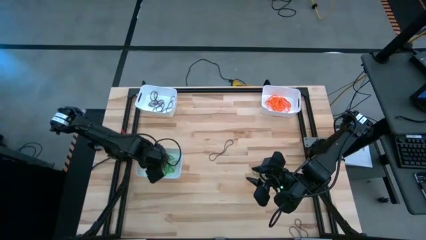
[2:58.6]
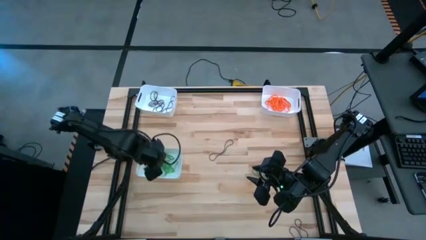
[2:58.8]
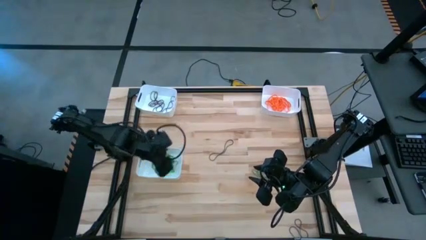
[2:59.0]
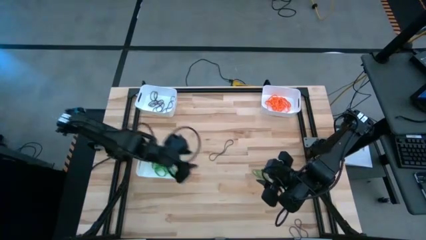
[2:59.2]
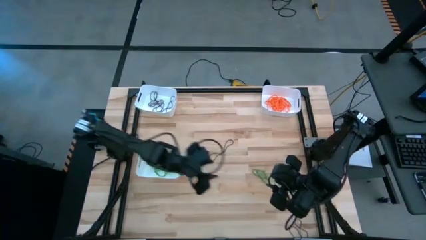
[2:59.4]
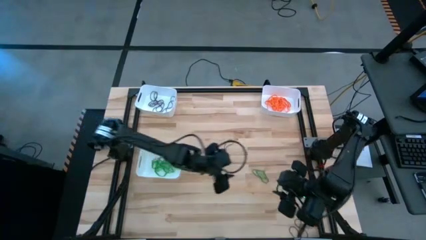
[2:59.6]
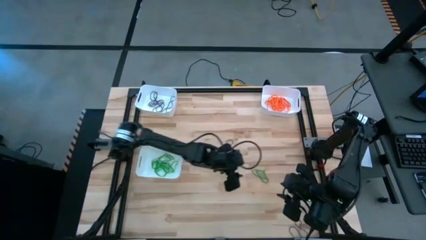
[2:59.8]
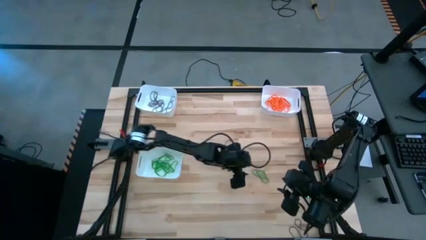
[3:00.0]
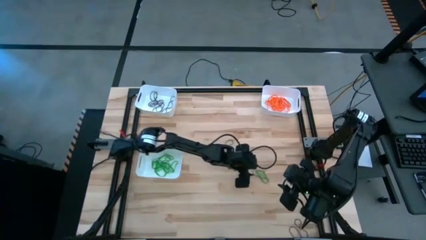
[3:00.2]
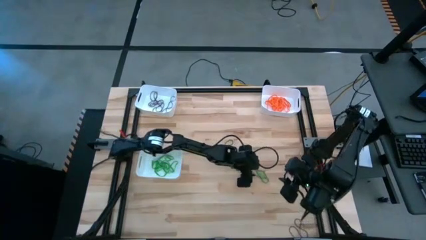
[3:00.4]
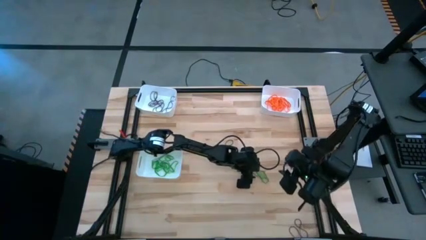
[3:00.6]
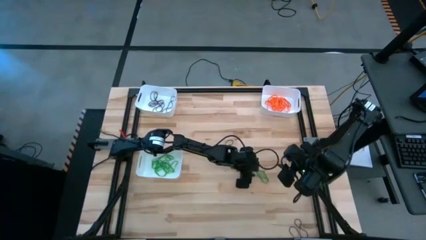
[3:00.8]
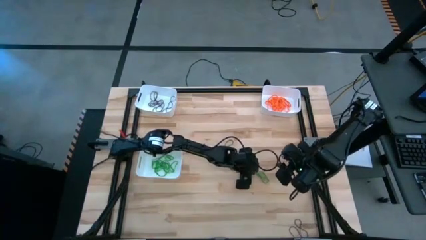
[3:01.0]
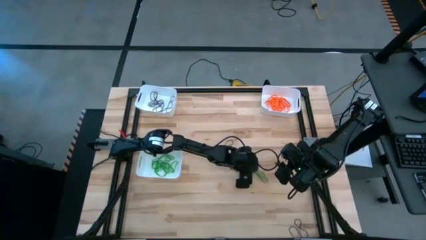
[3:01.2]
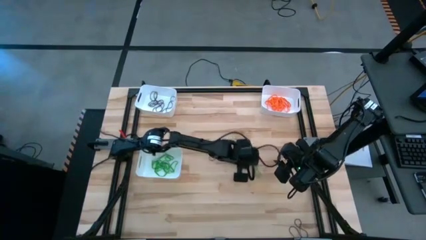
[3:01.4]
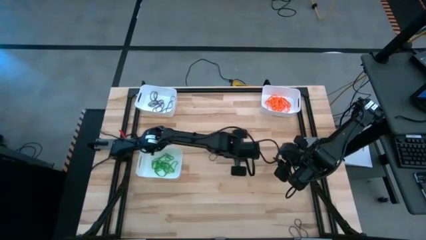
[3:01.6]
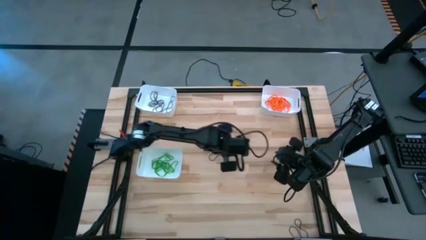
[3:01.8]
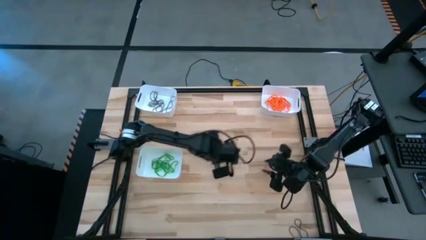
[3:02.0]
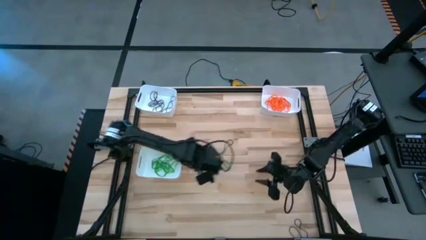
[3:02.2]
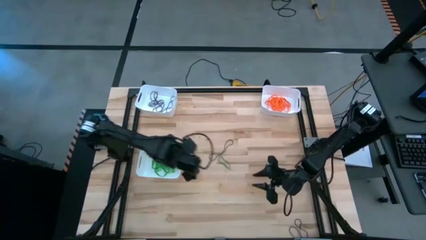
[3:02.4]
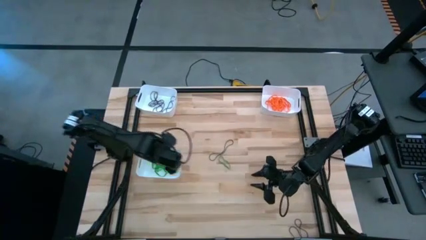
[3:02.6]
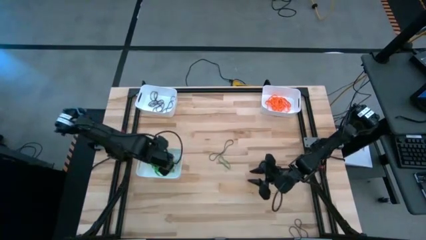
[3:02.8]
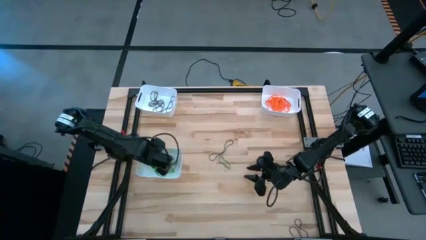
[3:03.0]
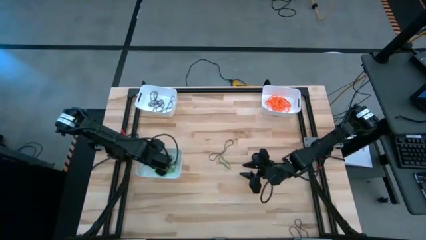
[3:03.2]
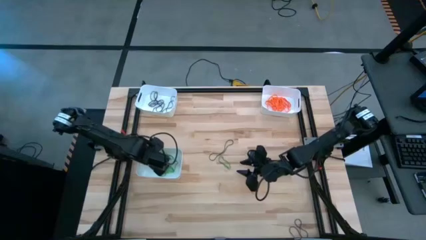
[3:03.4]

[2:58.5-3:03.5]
Task: Sort rubber bands into baskets
Put the green rubber band into the bottom white bin

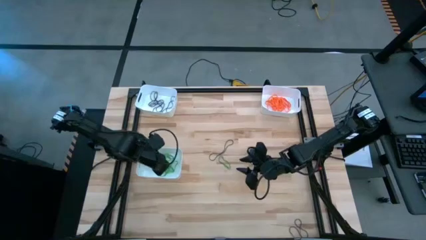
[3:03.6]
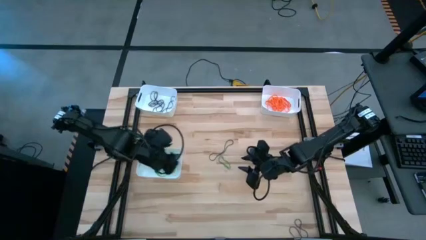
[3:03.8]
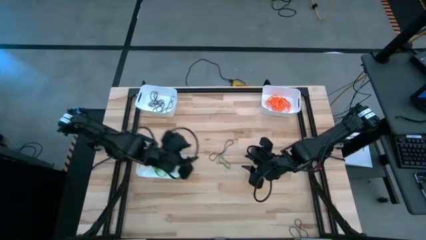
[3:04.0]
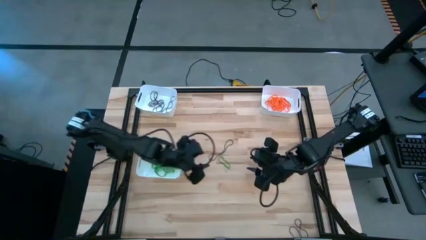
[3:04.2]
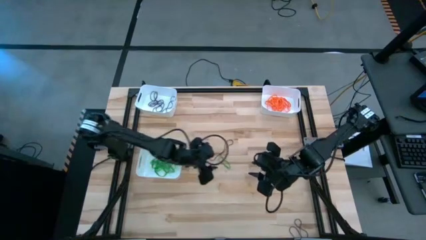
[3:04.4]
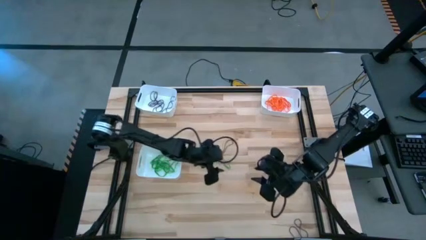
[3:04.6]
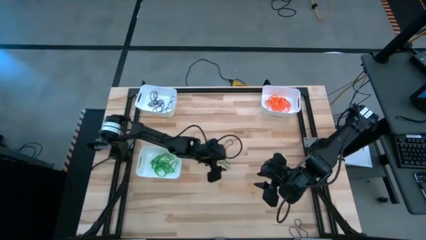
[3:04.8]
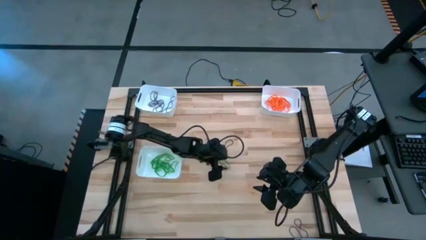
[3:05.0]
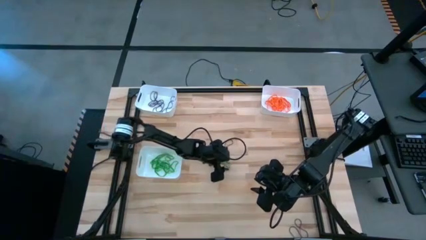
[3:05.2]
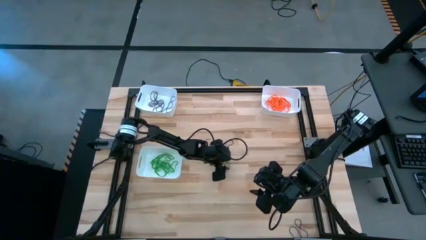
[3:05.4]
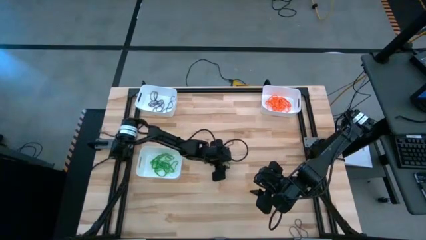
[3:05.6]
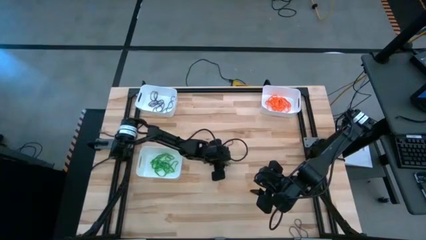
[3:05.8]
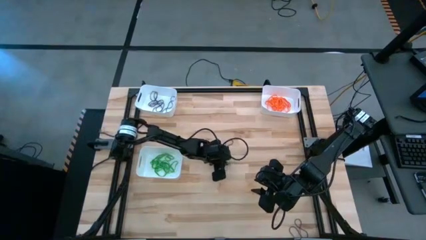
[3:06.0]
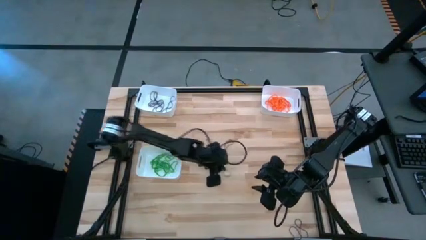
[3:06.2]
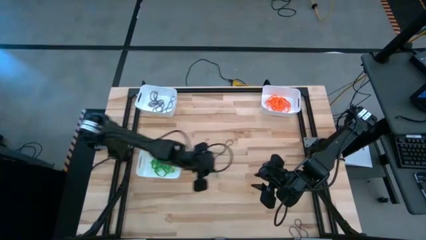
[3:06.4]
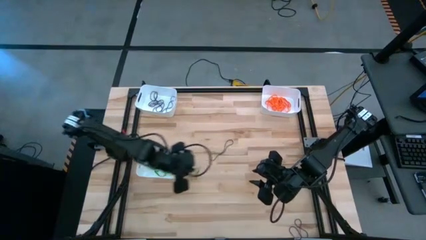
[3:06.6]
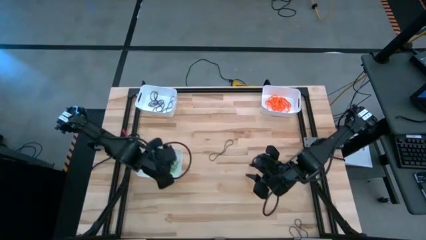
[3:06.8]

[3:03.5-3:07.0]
Put the green rubber band into the bottom white bin

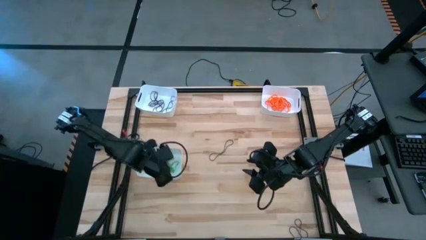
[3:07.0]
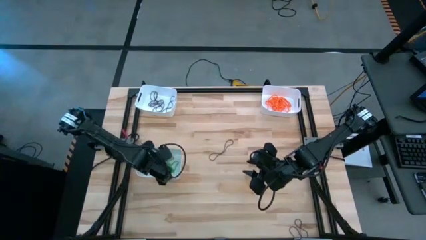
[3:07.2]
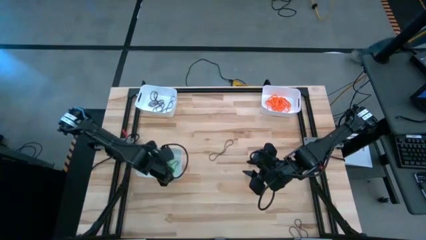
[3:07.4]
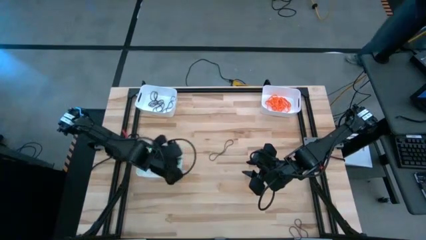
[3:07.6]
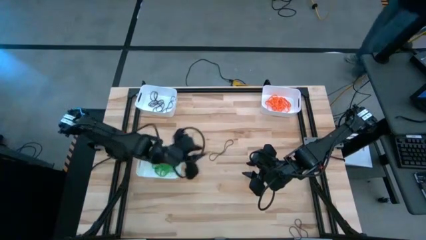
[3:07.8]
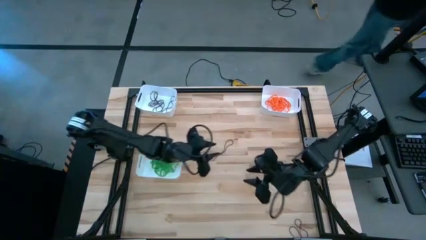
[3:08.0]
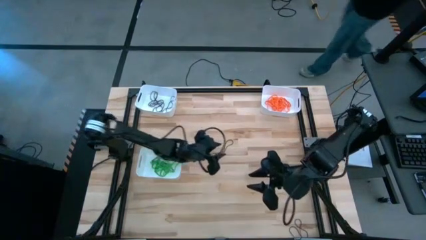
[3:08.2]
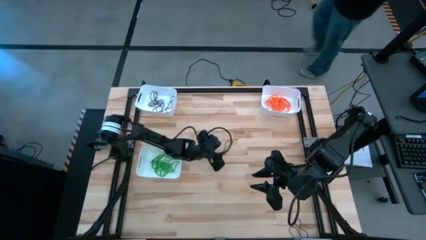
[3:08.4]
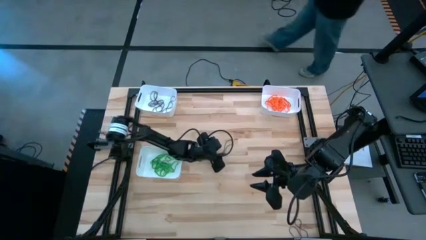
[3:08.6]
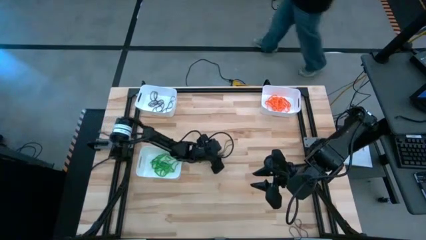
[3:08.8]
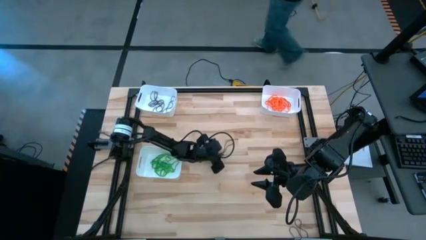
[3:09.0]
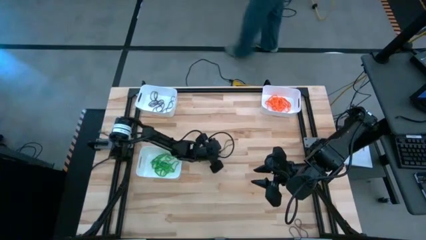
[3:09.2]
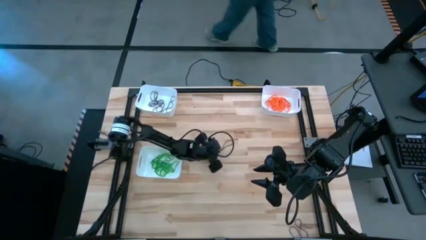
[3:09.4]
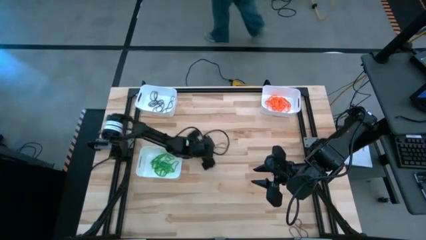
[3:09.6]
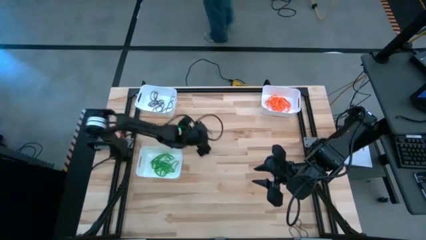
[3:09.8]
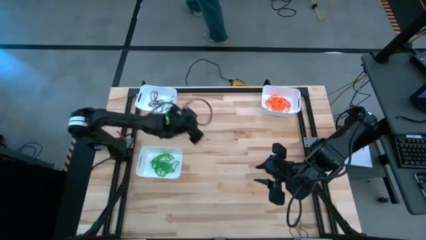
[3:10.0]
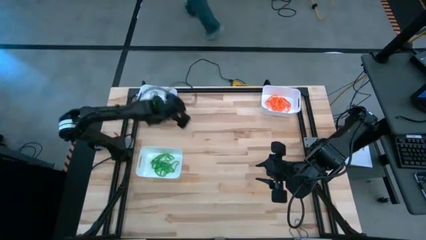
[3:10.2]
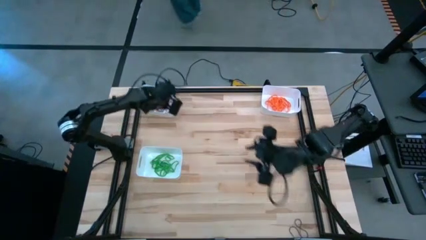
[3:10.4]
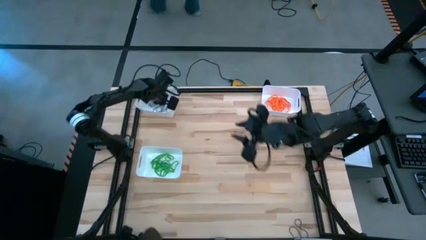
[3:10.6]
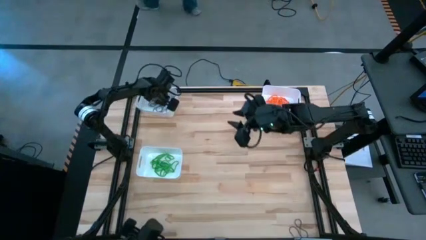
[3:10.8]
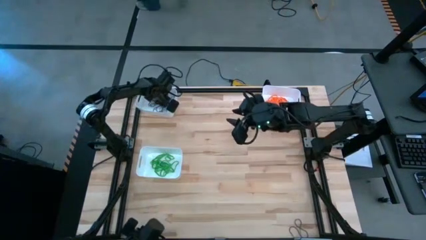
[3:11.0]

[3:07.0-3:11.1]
Put the purple rubber band into the top left white bin

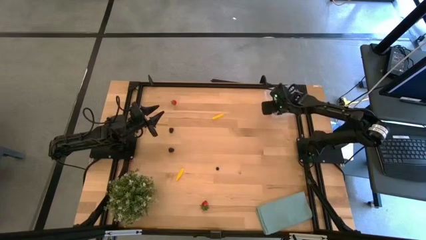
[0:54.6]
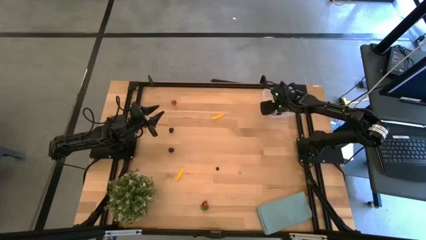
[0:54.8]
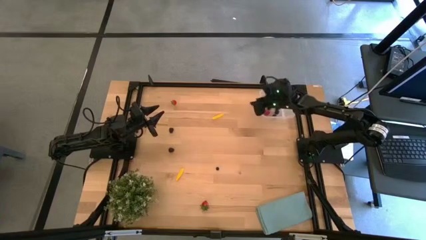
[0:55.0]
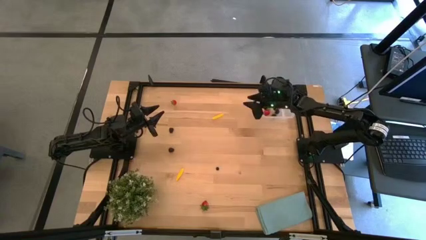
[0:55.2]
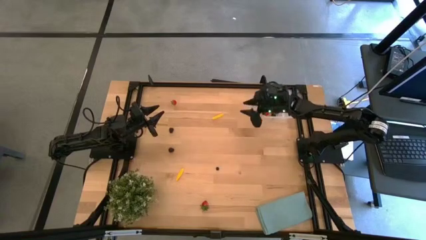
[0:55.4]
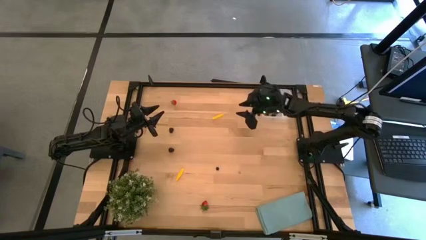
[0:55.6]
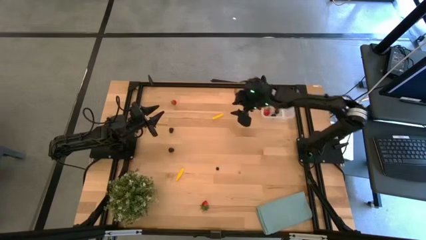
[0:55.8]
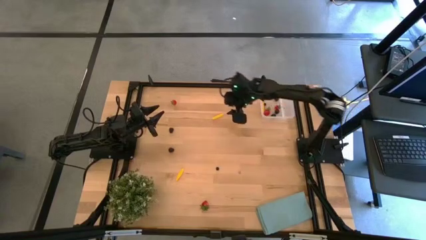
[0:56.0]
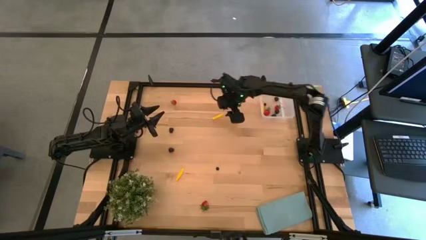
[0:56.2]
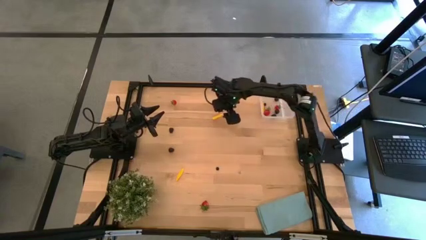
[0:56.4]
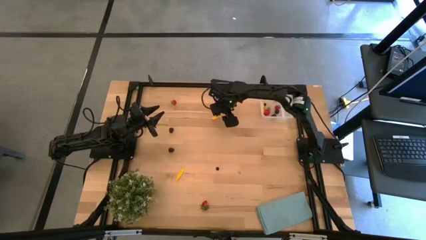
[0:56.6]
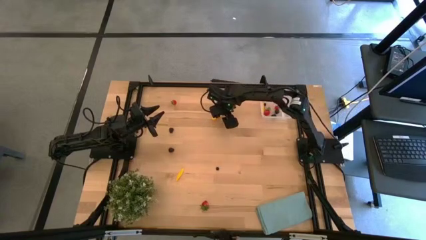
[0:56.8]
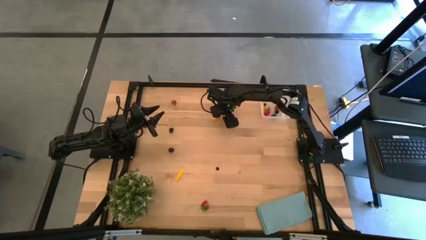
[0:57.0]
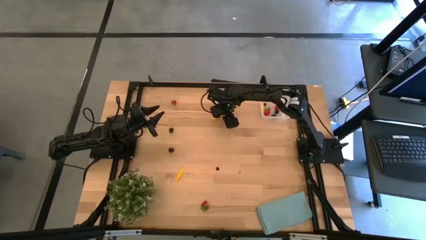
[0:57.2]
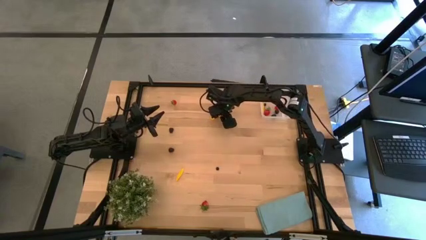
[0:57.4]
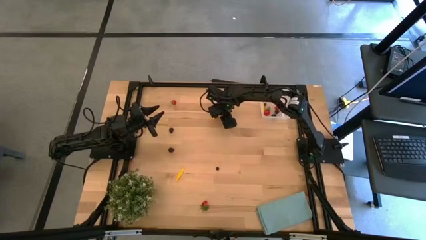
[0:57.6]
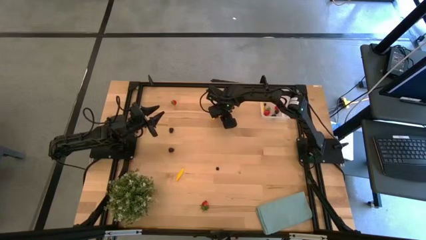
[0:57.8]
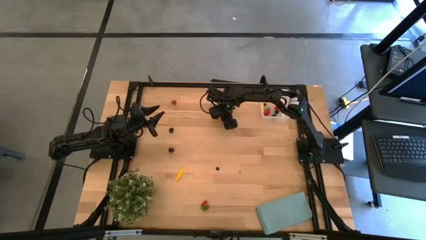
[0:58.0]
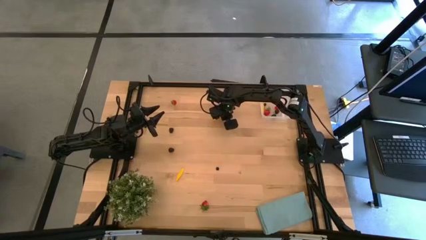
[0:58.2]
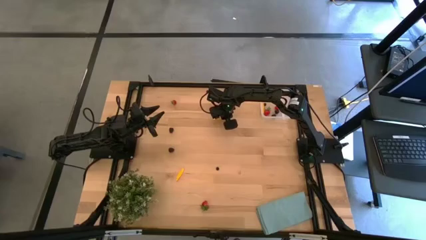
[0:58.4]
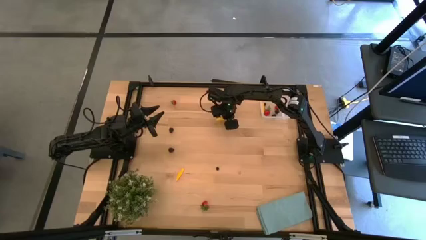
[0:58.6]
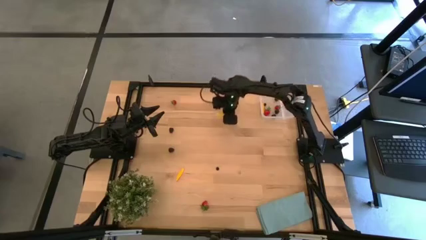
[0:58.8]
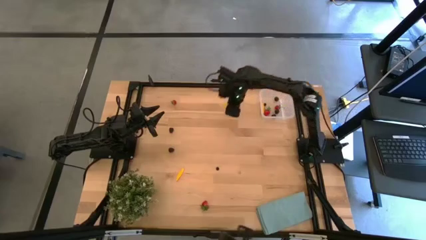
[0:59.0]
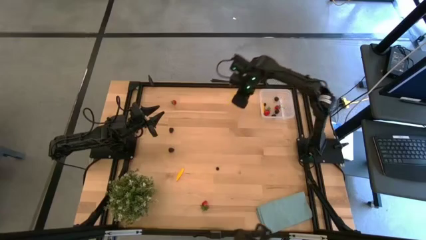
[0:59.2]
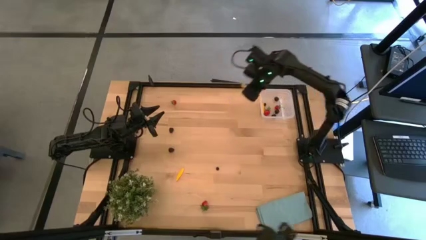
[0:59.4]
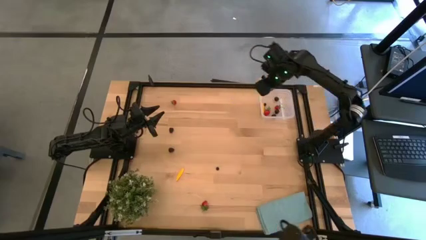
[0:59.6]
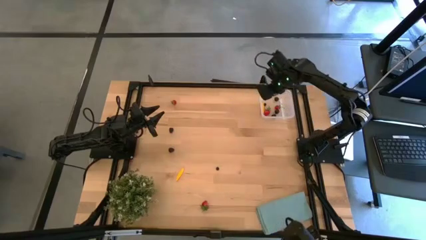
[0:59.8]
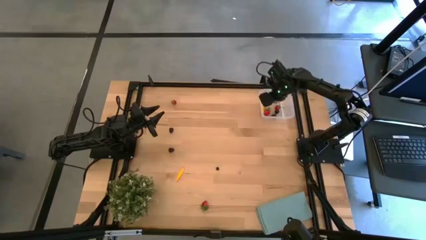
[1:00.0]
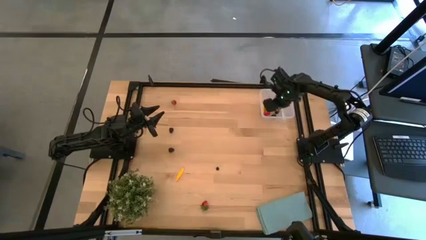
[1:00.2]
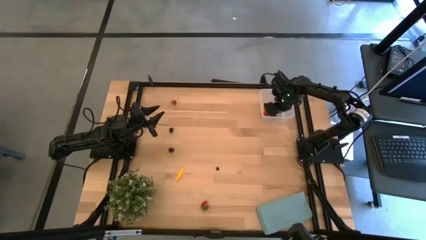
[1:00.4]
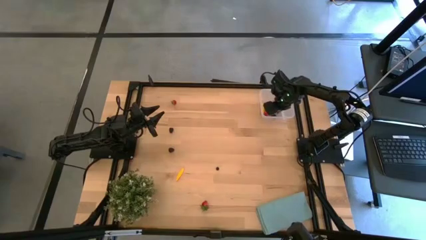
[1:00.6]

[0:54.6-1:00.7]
Task: Pick and placing Produce into tupperware
Put the yellow corn into the transparent bin
